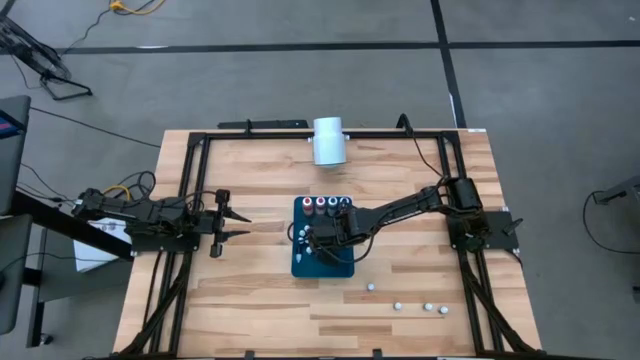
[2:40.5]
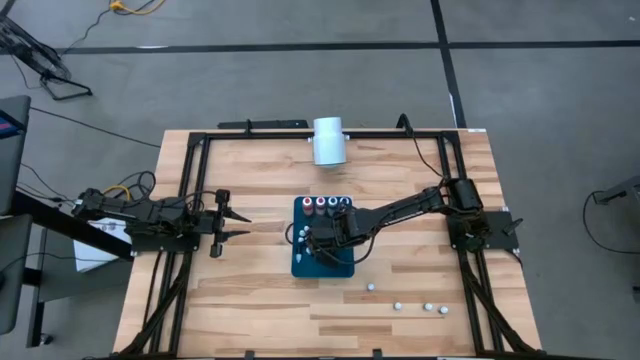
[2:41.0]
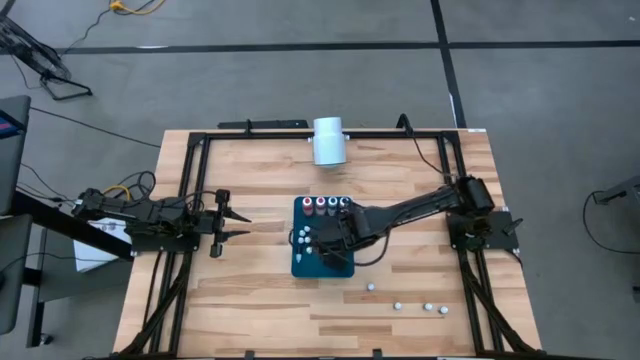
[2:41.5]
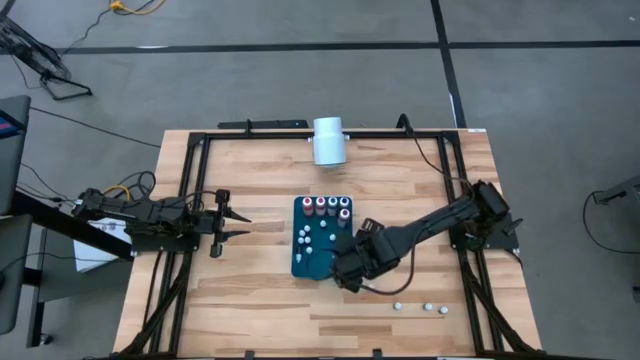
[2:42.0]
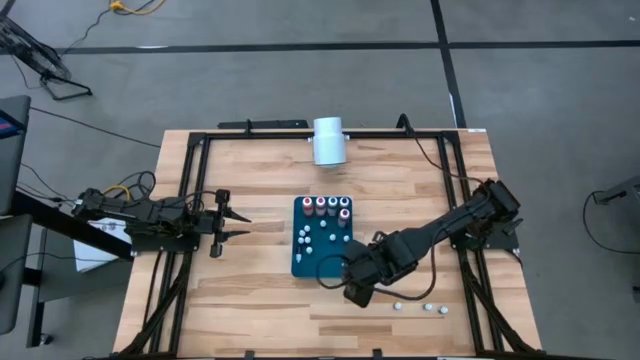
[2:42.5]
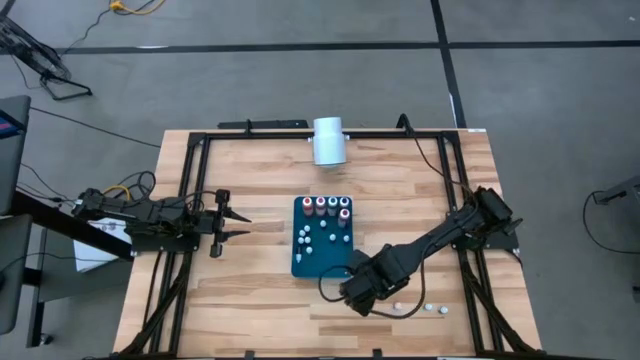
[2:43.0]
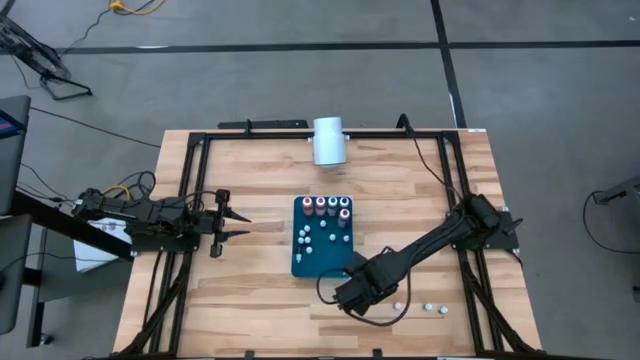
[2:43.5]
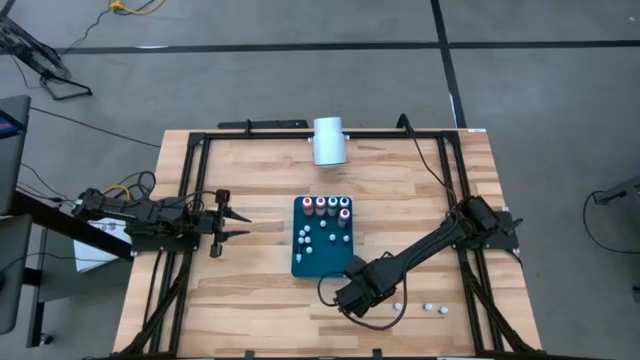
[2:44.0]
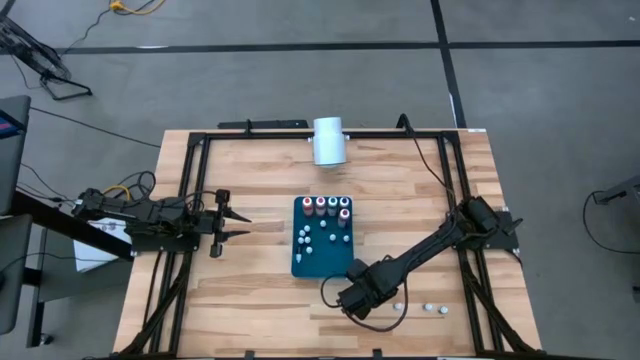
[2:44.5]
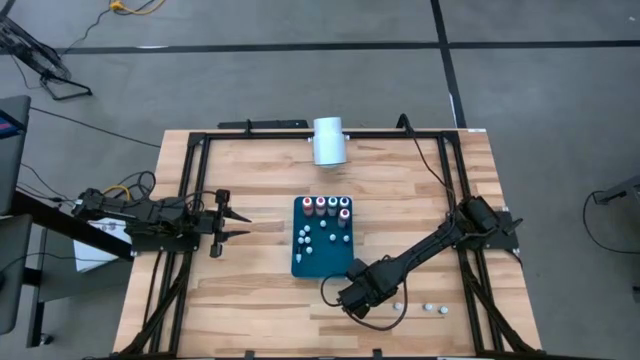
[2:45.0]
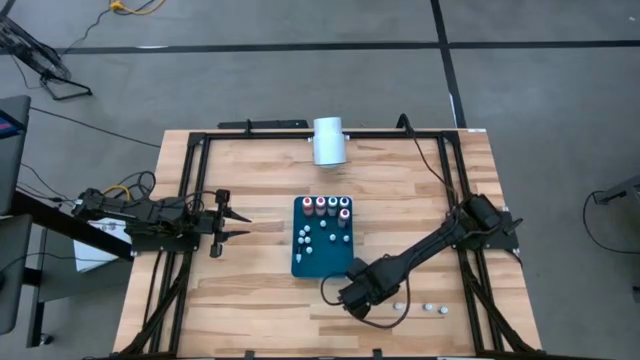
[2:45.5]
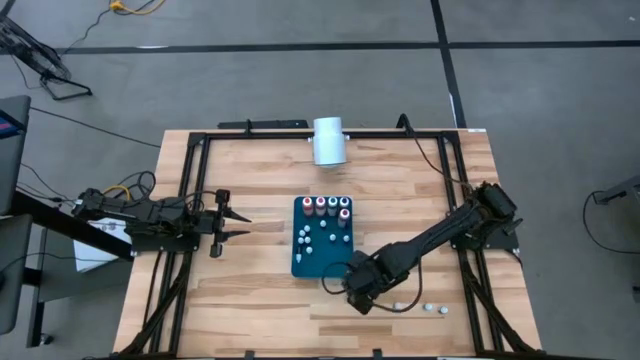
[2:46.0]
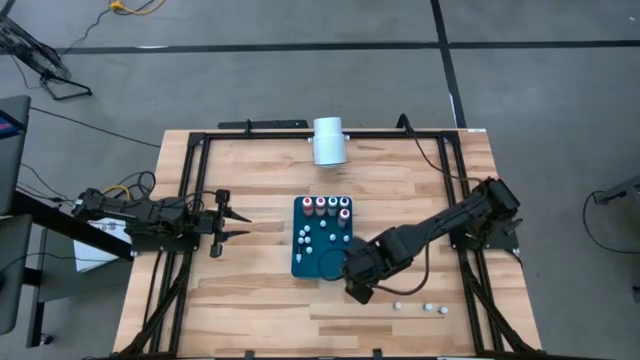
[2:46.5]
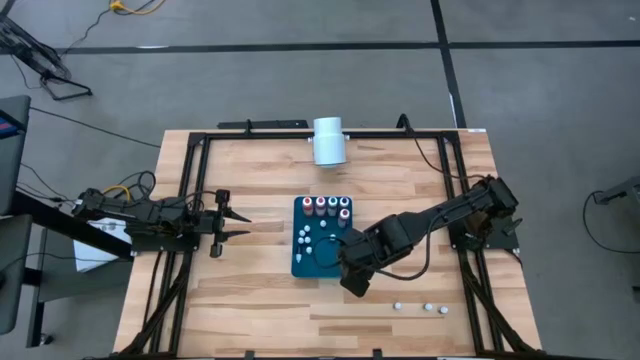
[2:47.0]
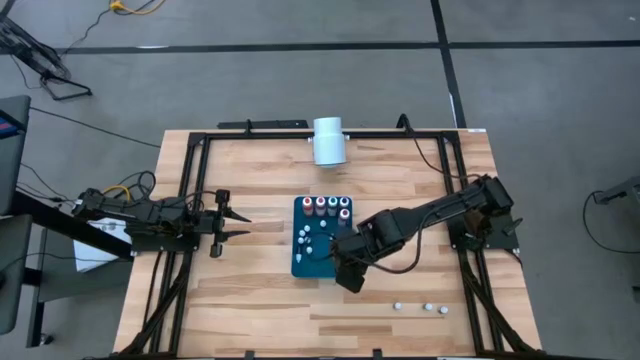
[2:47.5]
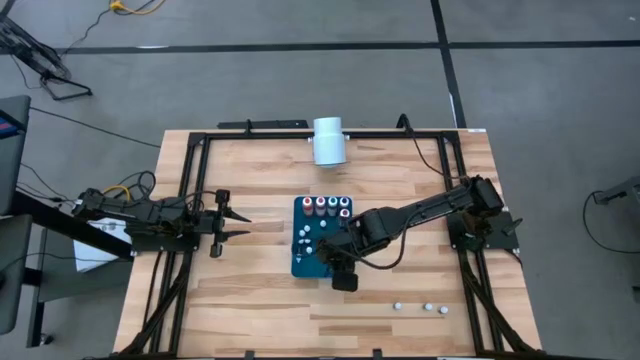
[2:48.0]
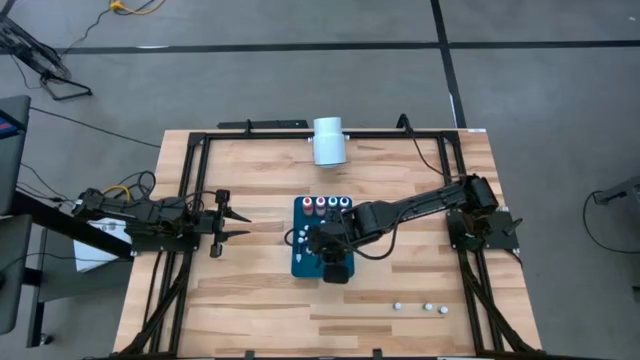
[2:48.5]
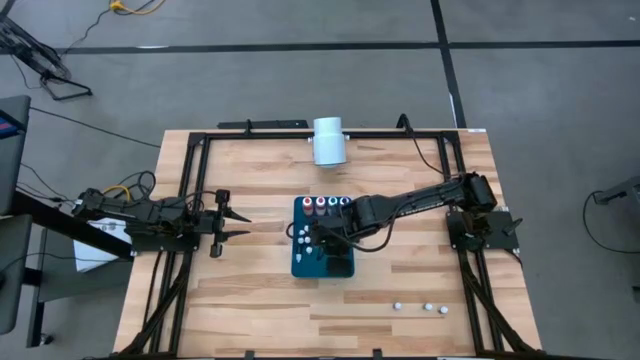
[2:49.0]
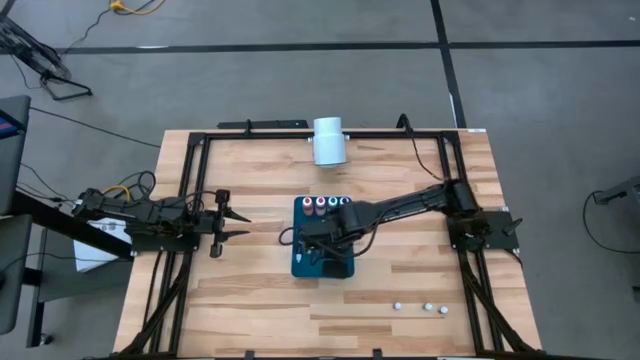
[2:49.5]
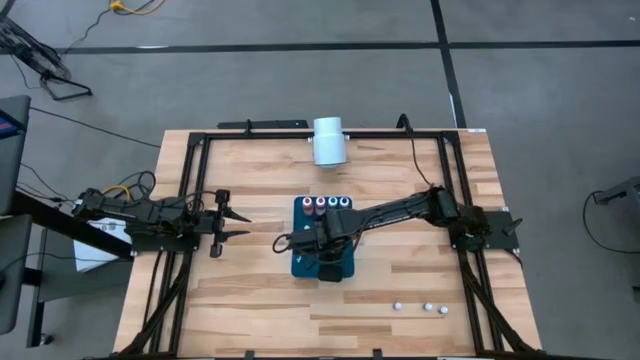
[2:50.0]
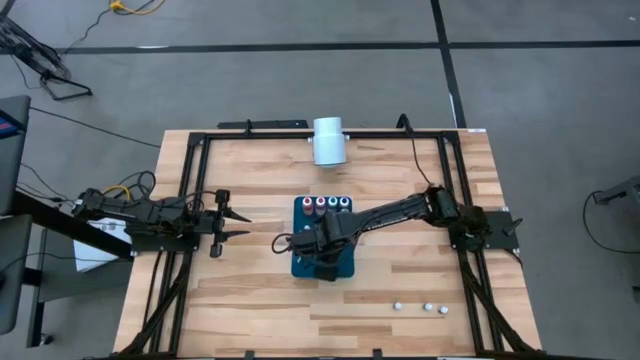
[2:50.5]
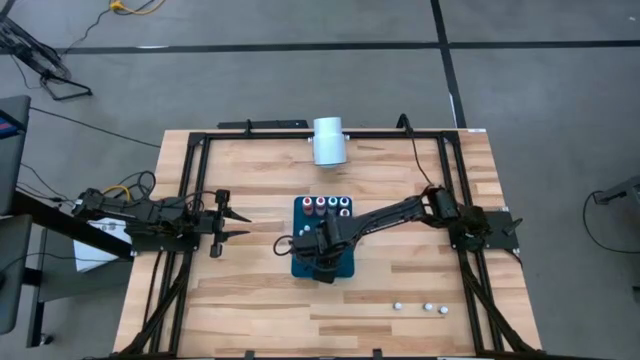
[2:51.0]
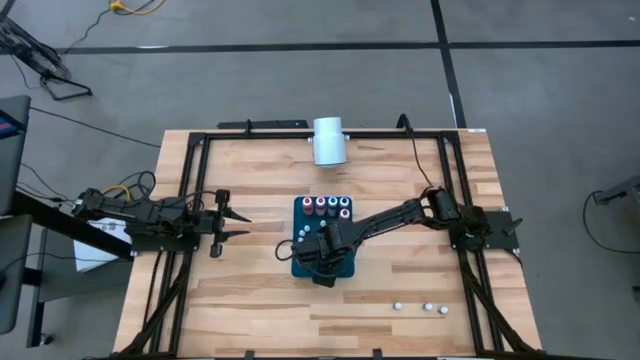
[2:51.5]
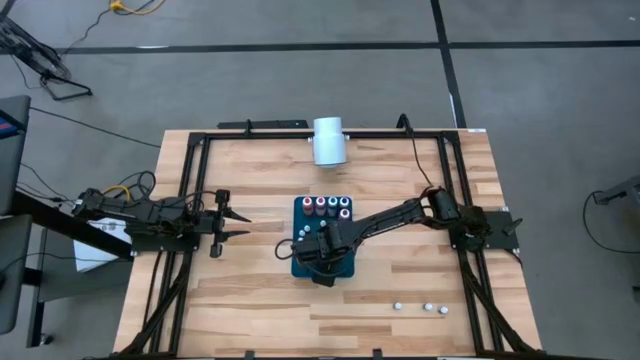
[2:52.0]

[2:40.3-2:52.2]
Task: Pick & Place food coloring
Put the small blue food coloring bottle into the blue bin

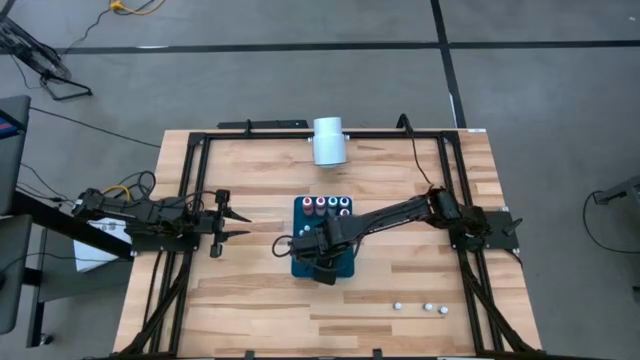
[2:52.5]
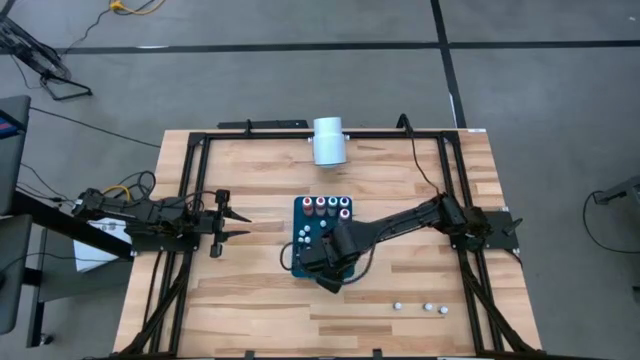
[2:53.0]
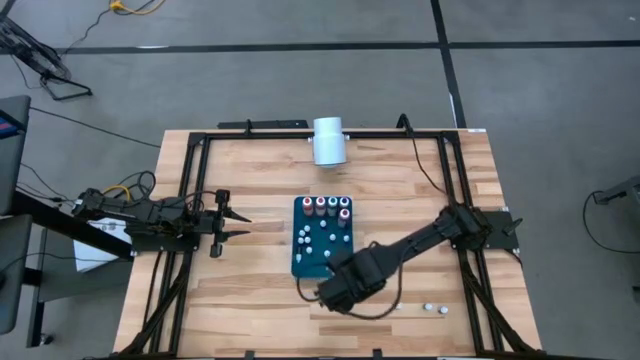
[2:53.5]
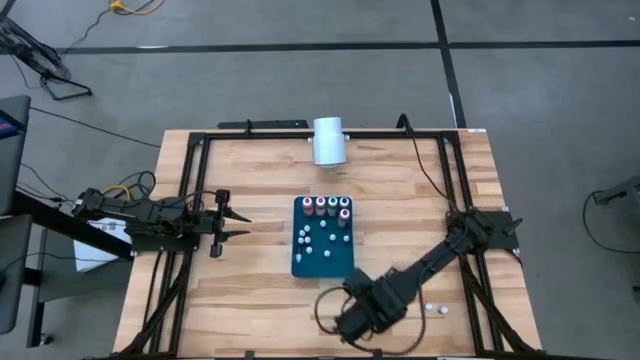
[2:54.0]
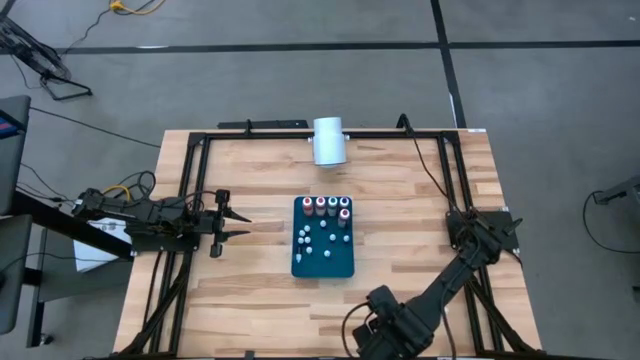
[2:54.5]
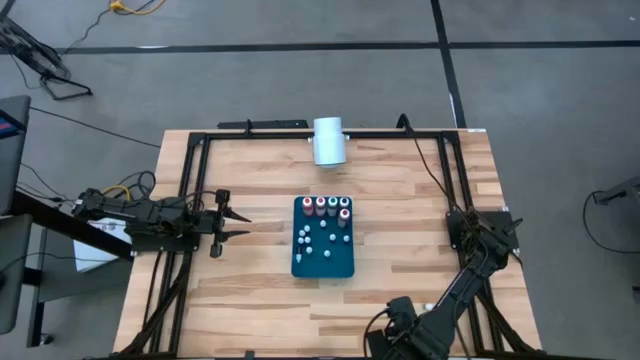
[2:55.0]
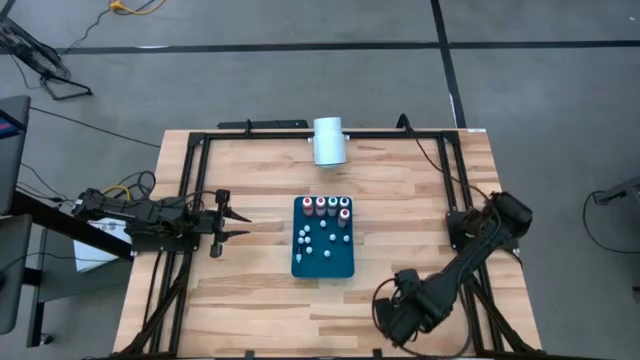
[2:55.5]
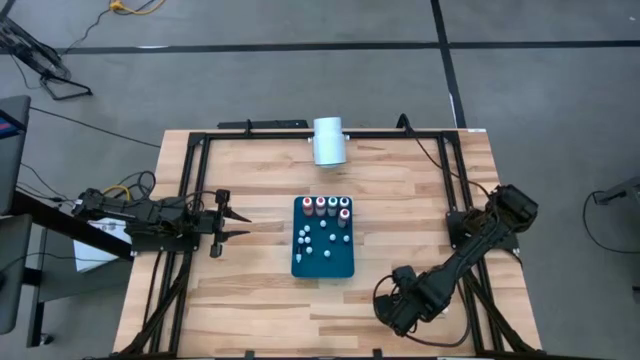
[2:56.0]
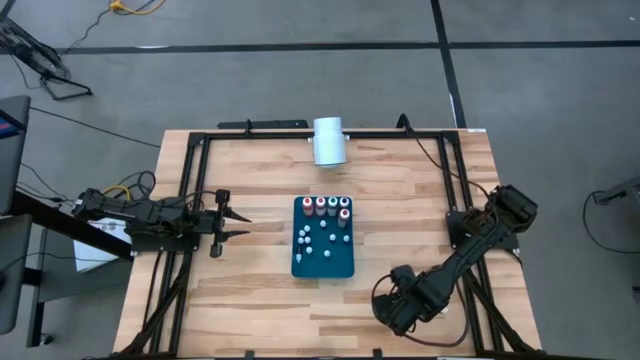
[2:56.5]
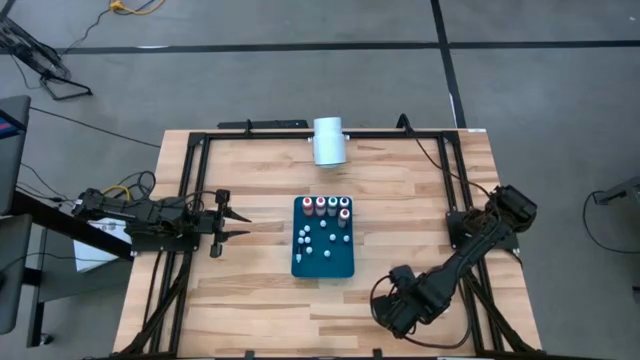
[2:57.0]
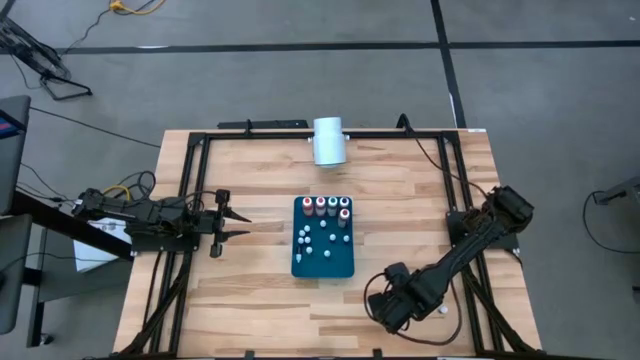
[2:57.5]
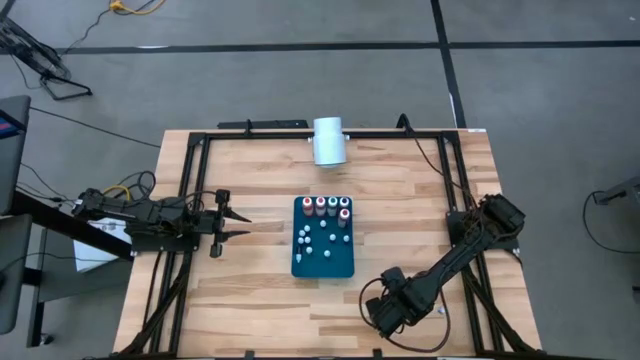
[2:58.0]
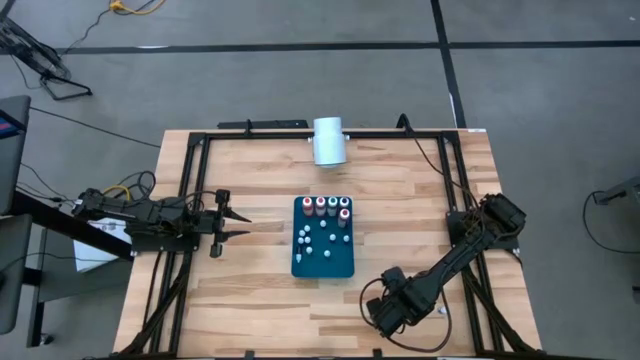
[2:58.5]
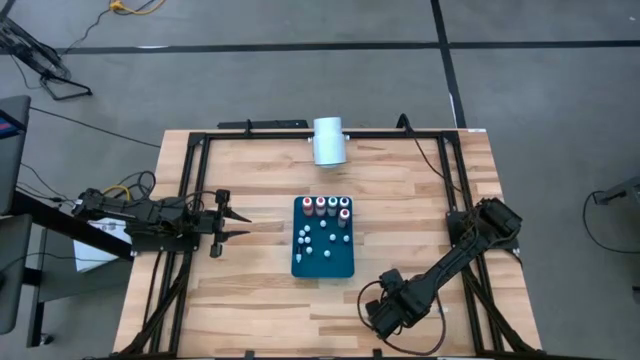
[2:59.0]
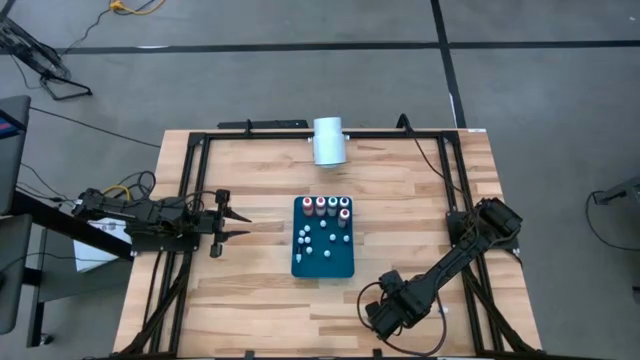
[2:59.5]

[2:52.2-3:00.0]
Put the small brown food coloring bottle into the blue bin

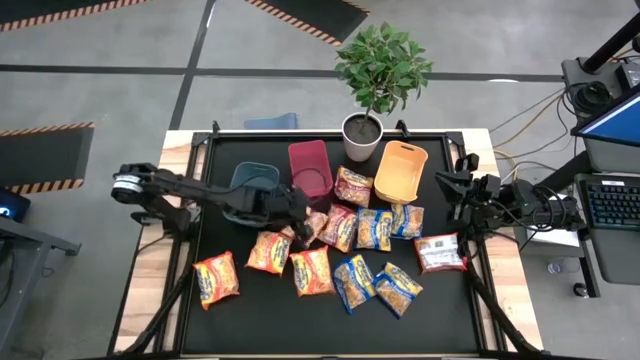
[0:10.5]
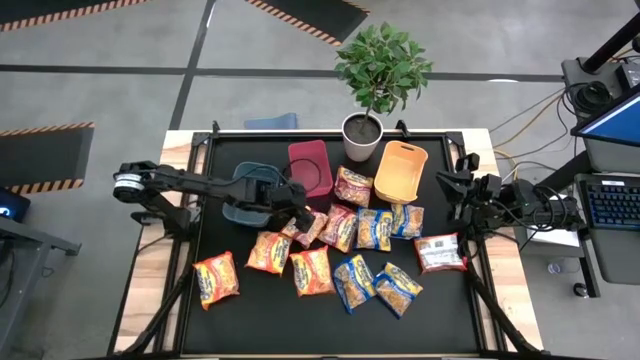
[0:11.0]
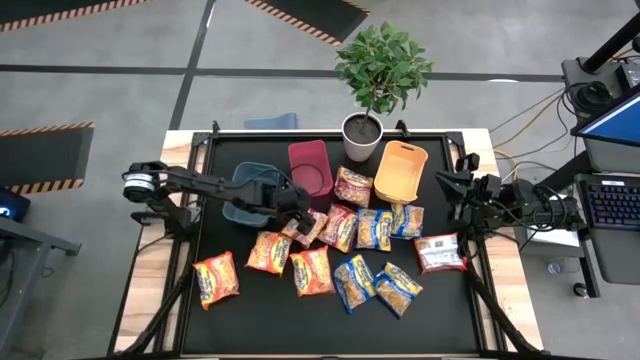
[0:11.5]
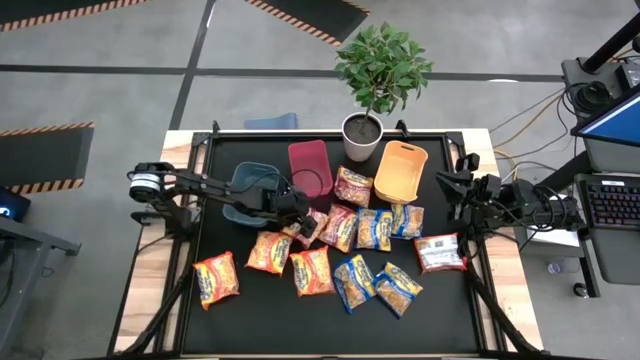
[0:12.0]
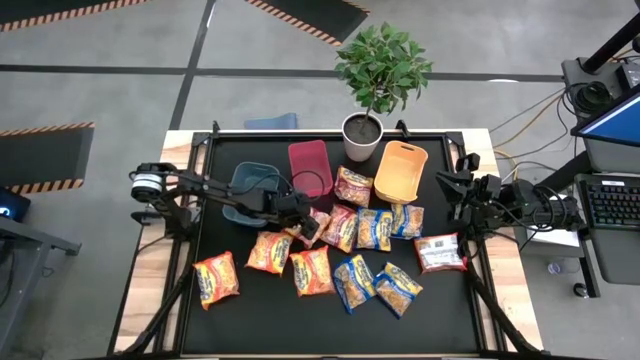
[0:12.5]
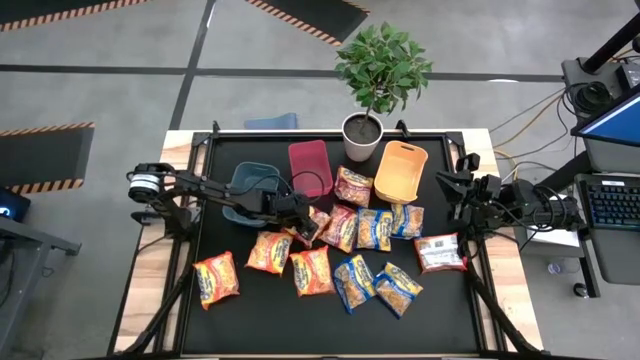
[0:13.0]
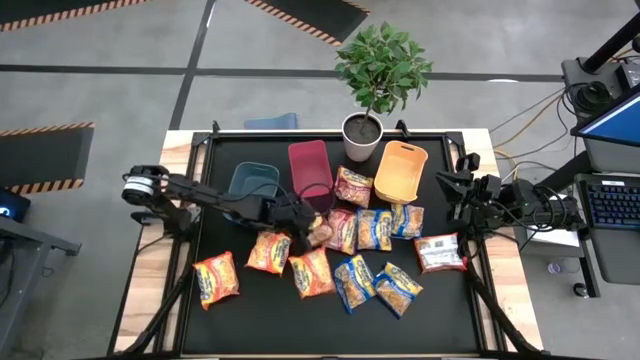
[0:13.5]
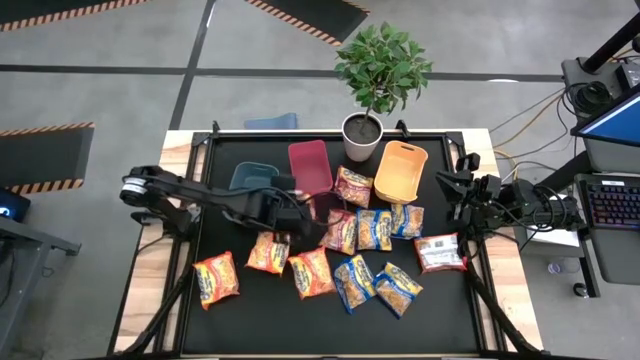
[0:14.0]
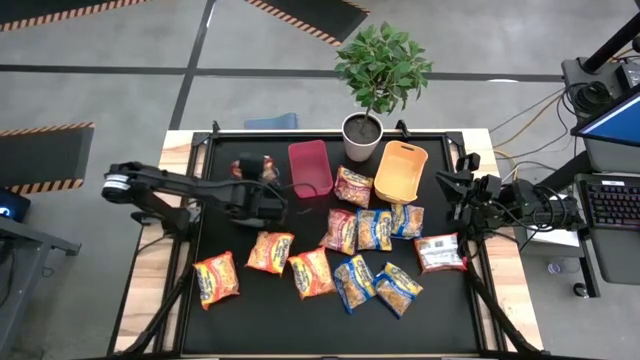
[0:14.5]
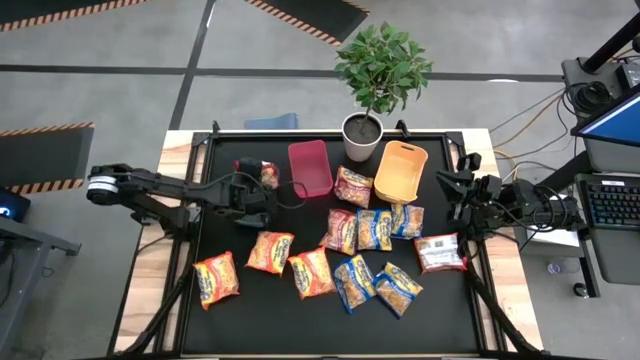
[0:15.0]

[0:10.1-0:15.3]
Task: Sort Maruchan noodles
Put the left red noodle pack into the blue bin
